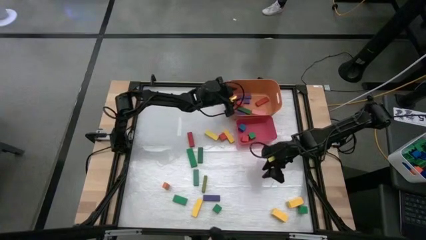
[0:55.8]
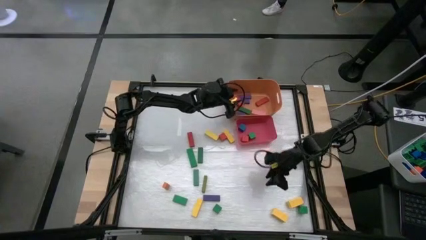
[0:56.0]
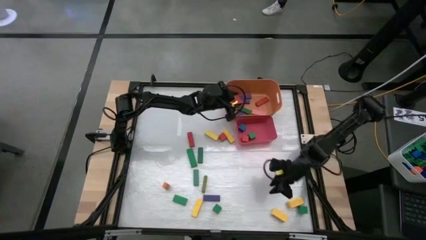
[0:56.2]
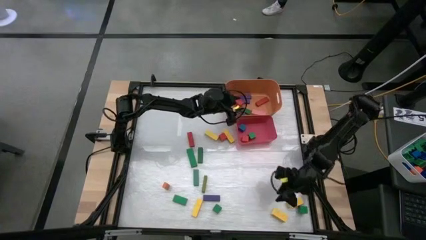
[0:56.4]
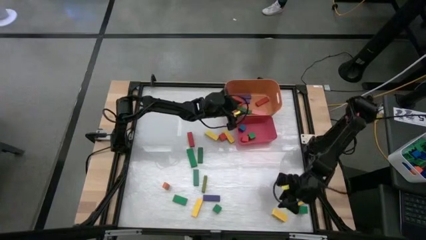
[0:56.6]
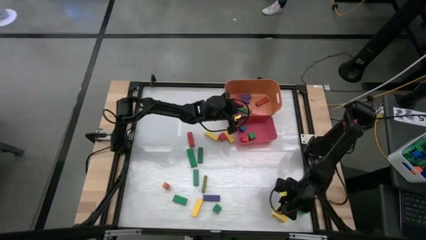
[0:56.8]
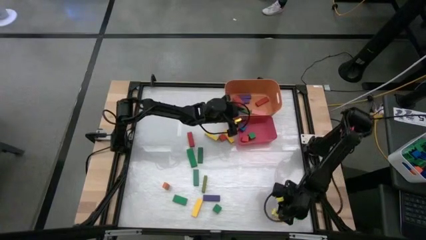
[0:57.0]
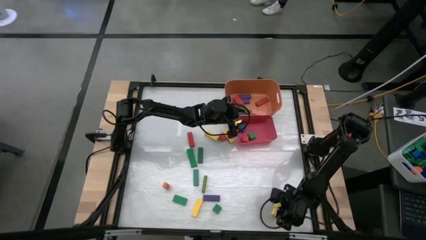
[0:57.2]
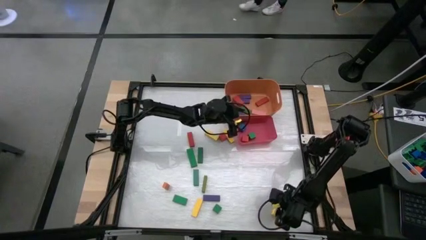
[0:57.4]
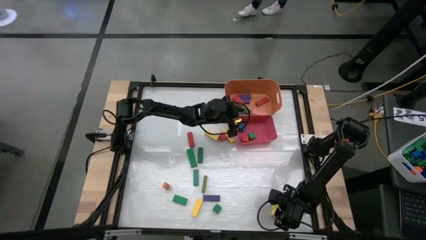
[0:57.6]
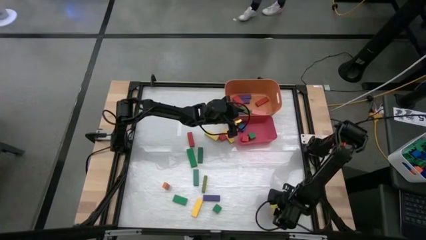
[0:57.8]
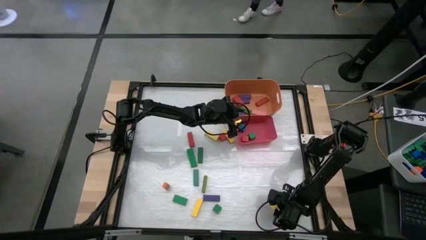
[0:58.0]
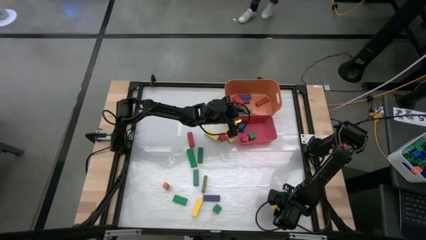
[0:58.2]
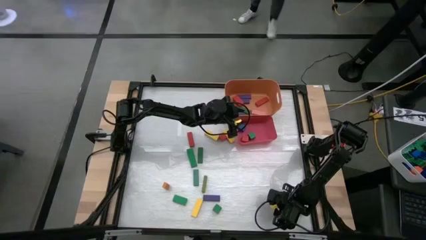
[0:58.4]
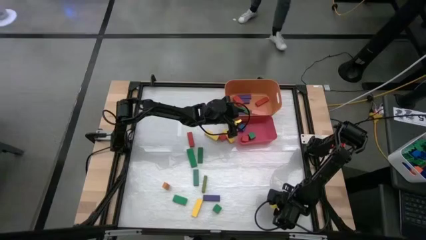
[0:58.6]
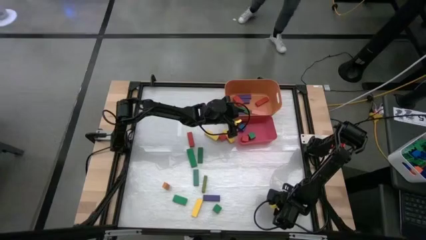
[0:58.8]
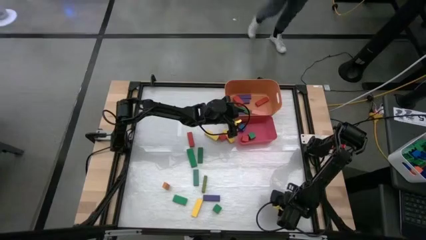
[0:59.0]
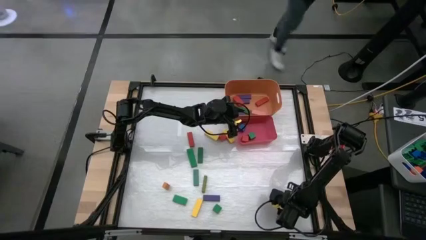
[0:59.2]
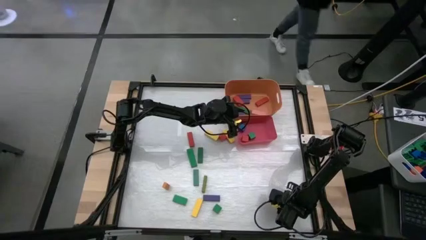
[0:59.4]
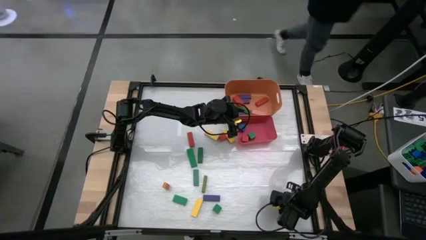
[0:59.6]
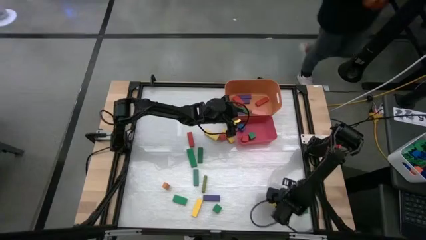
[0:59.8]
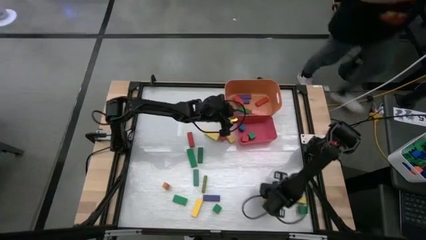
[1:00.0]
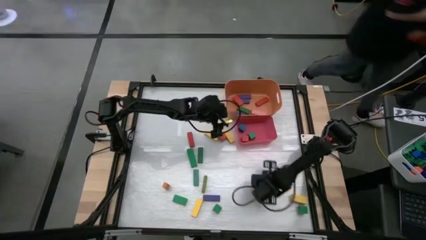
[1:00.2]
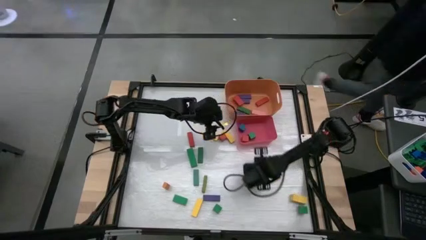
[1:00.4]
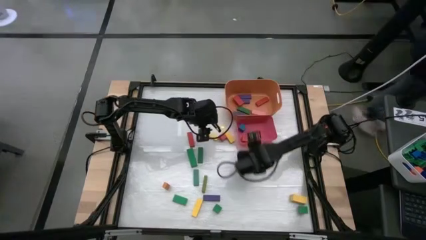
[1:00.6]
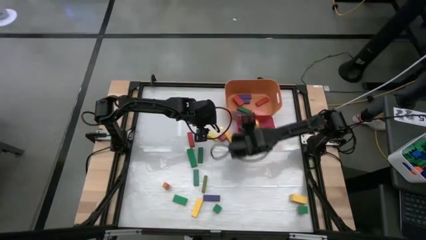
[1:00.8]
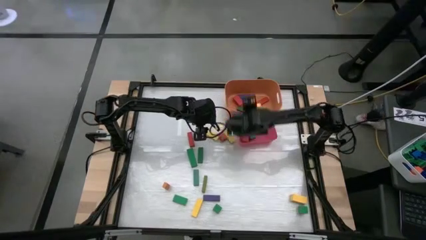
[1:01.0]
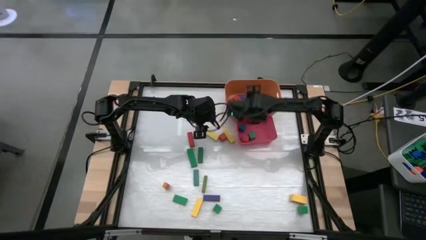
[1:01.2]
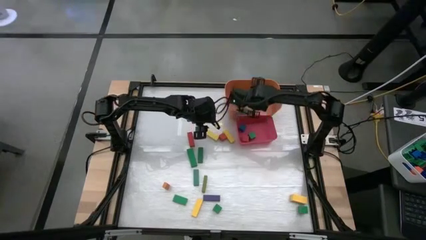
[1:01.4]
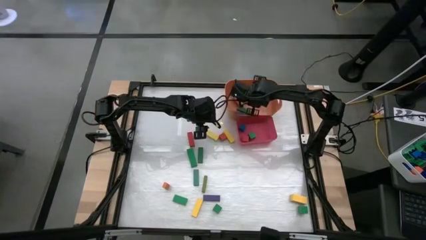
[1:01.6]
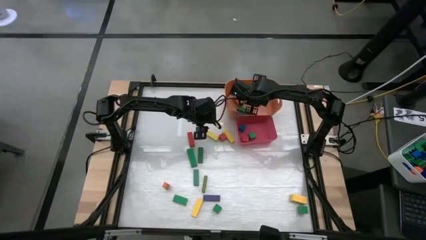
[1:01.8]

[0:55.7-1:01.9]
Task: Sort blocks by size
Put the yellow rectangle block into the orange bin

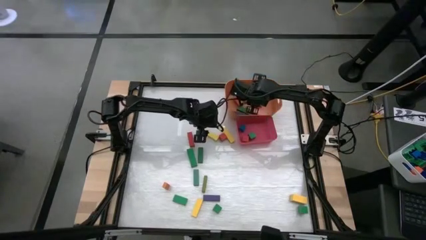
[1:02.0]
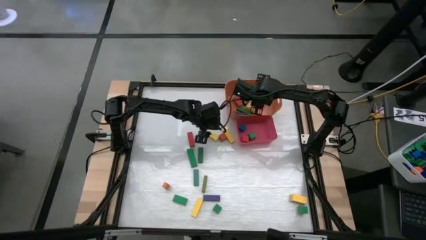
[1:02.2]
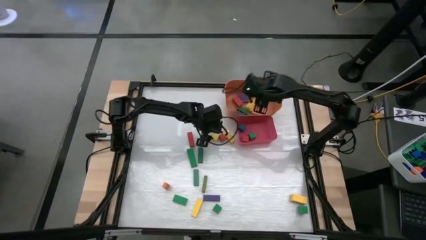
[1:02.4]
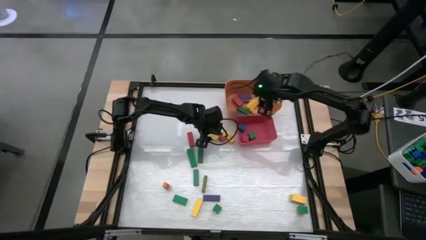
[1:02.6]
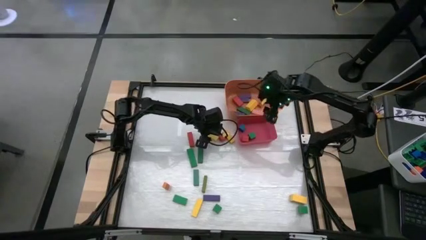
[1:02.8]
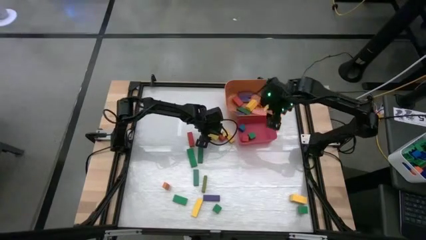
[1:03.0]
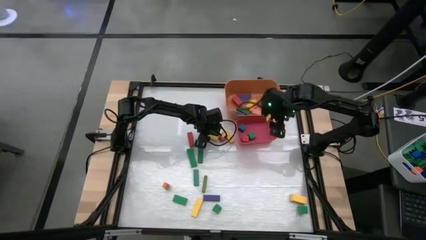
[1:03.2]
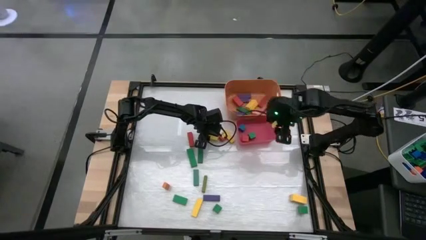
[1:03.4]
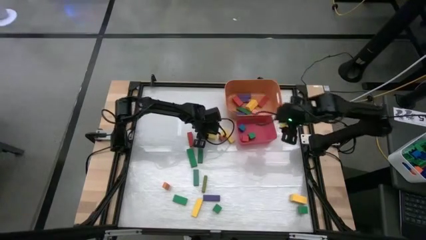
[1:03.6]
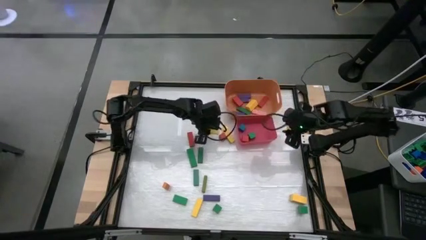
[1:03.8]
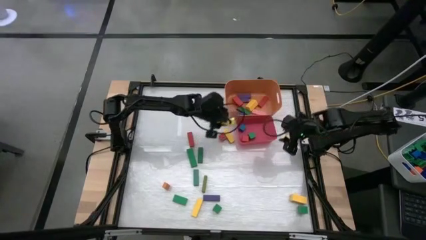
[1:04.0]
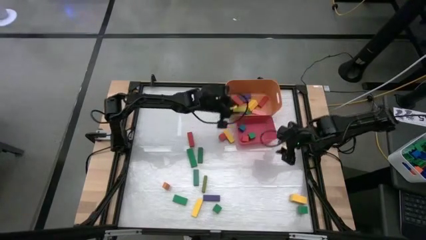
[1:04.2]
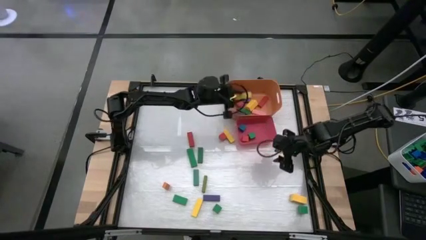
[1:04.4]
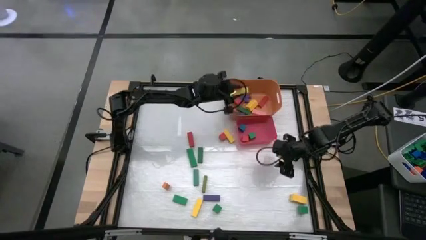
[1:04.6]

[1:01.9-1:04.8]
Put the yellow rectangle block into the orange bin

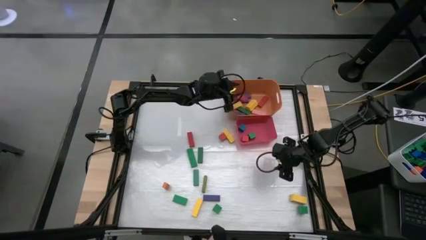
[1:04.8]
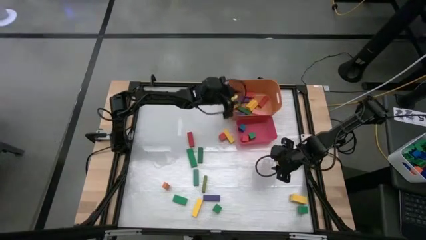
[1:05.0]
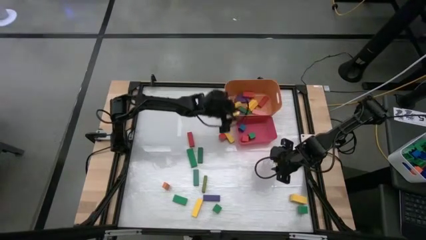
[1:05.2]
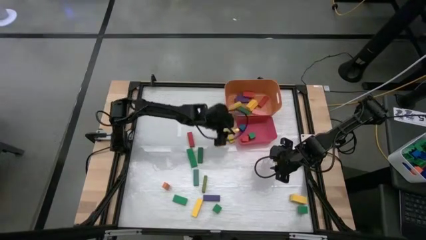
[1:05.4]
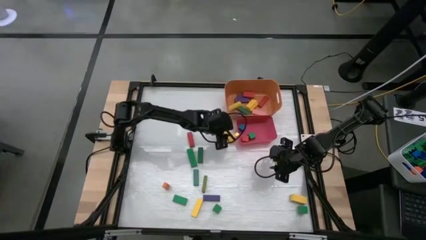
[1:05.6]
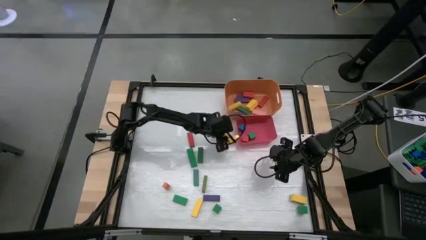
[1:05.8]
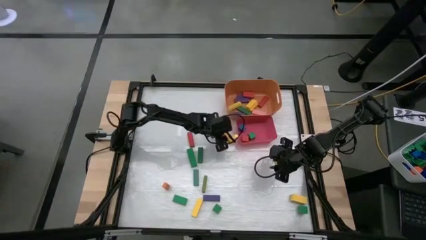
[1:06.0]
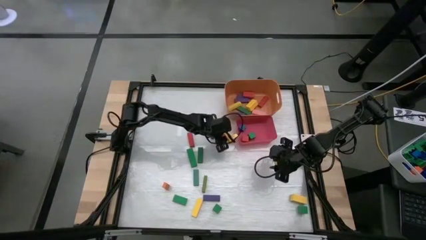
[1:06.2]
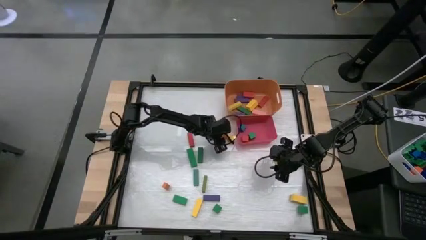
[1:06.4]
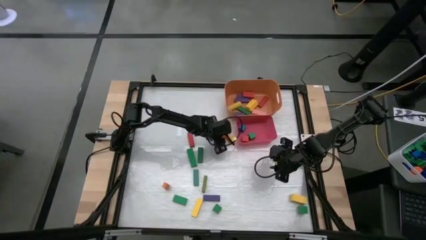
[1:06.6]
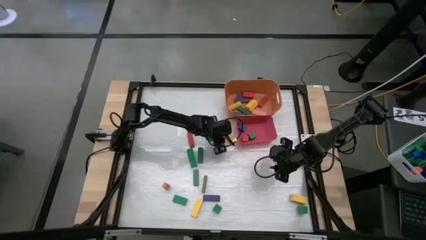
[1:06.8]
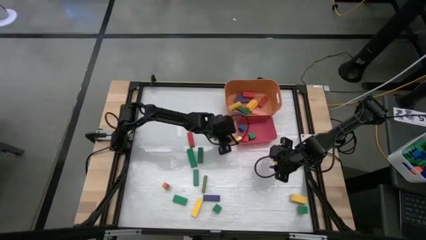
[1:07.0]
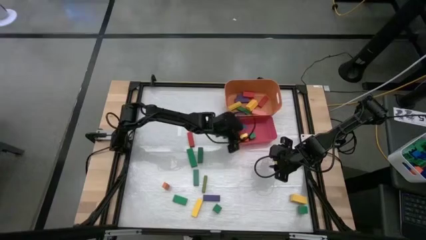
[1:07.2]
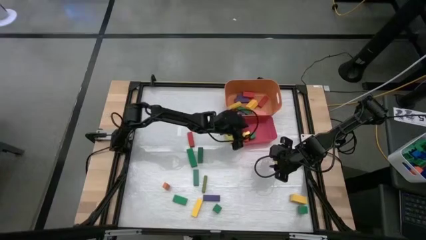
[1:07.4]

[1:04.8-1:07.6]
Put the red square block into the red bin

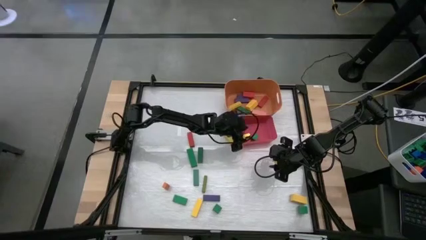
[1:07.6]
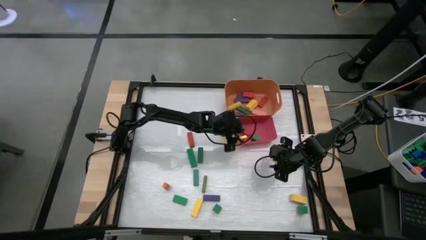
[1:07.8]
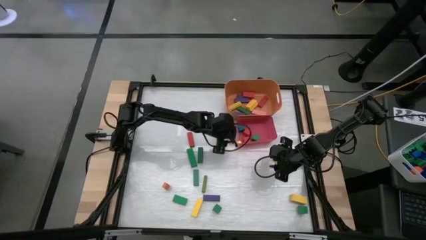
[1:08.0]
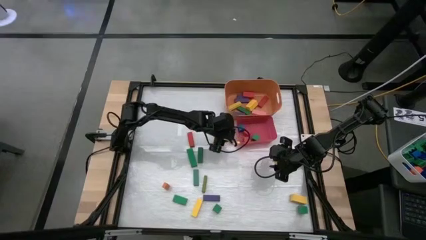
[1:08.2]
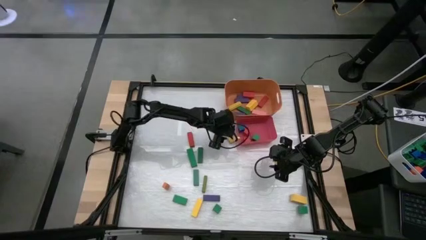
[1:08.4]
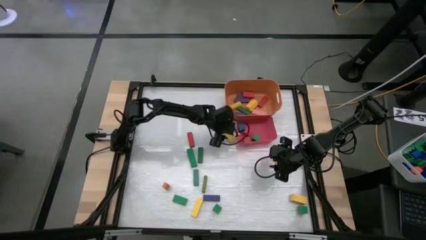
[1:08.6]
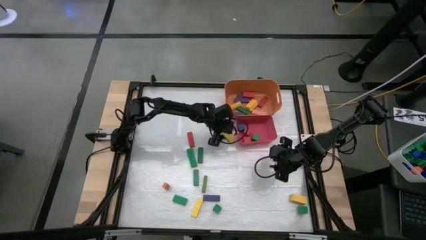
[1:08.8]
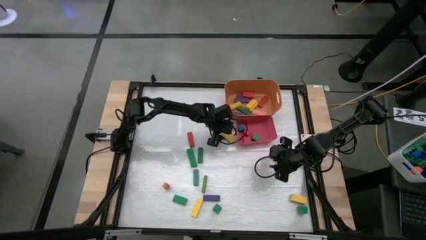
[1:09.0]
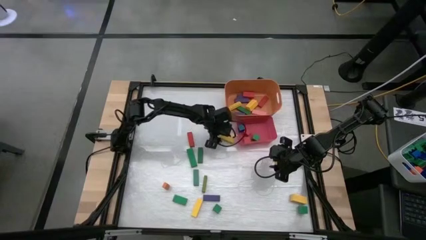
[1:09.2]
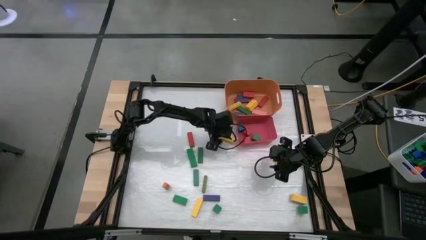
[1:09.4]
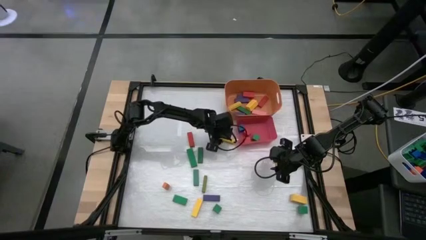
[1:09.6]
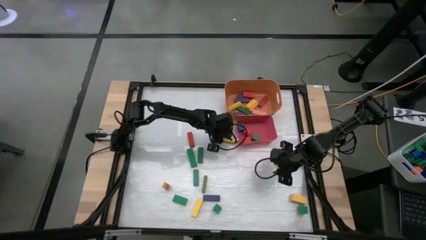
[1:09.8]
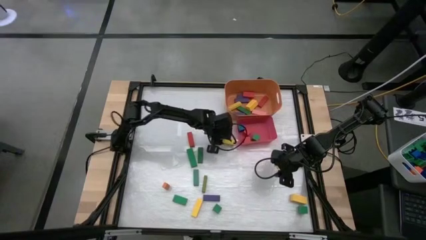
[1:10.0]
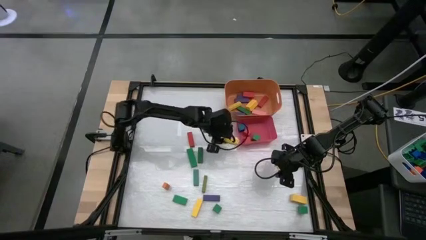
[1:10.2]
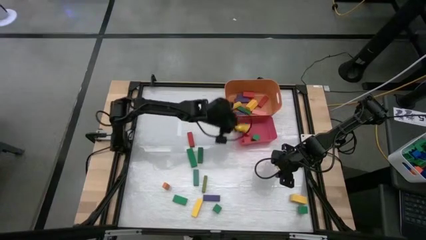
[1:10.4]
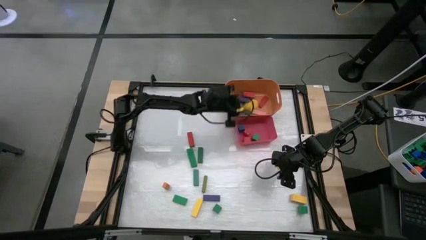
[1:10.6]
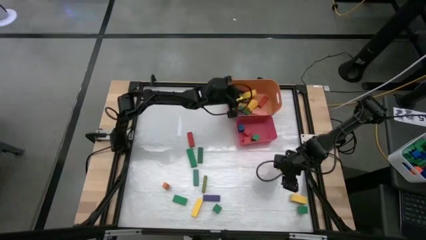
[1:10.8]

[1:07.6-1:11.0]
Put the yellow rectangle block into the orange bin

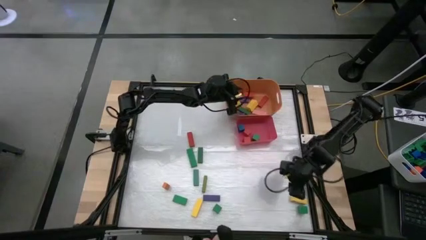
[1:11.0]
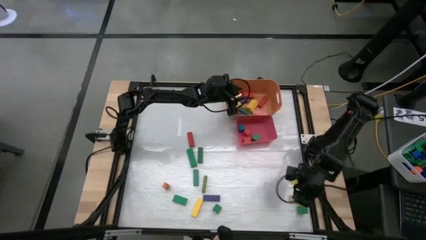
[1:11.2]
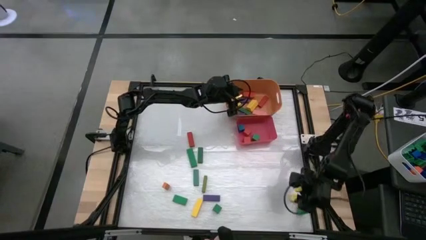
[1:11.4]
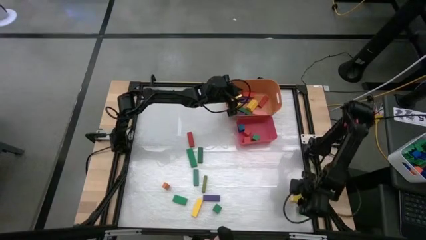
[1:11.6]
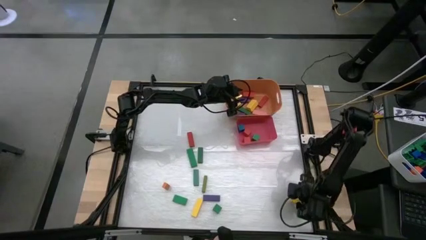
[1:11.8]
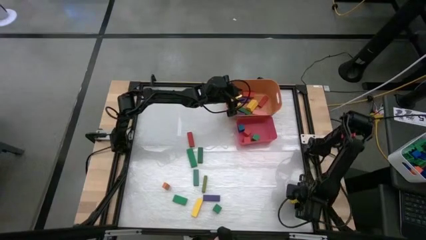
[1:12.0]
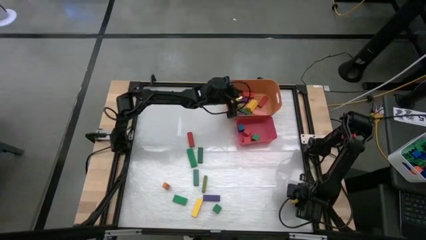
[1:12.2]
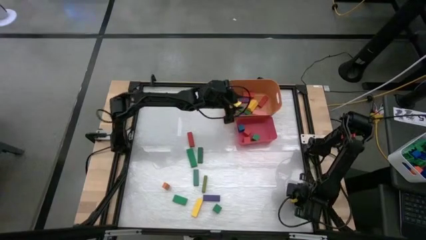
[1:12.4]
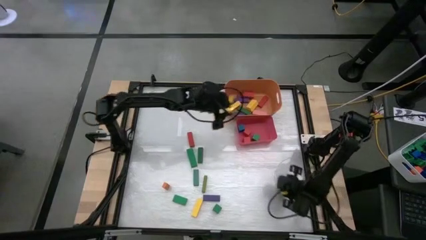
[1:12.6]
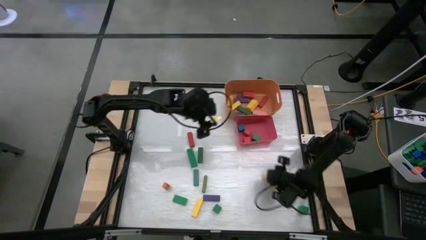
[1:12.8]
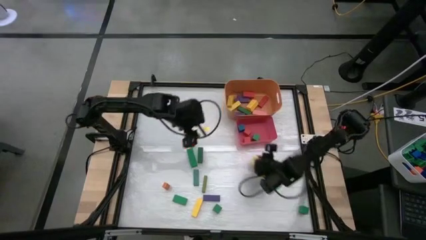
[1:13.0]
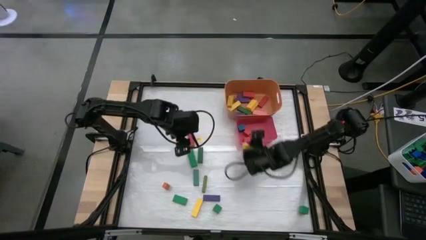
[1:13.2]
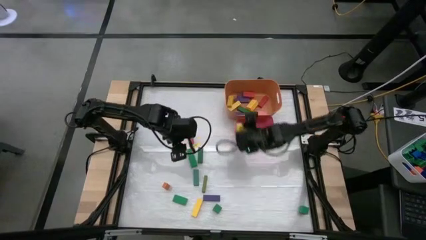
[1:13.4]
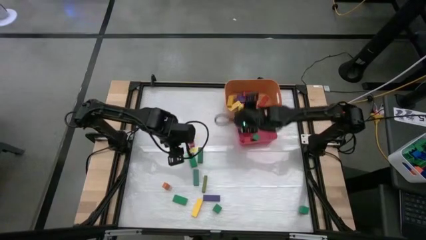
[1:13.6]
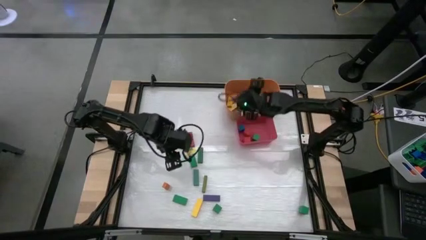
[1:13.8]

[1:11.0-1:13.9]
Put the yellow rectangle block into the orange bin
